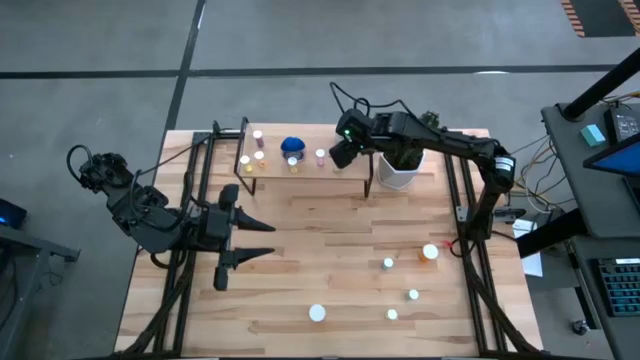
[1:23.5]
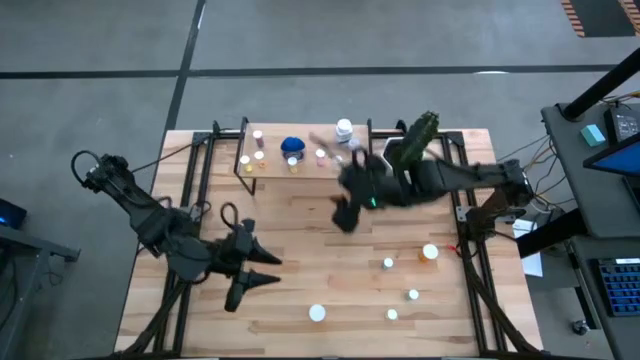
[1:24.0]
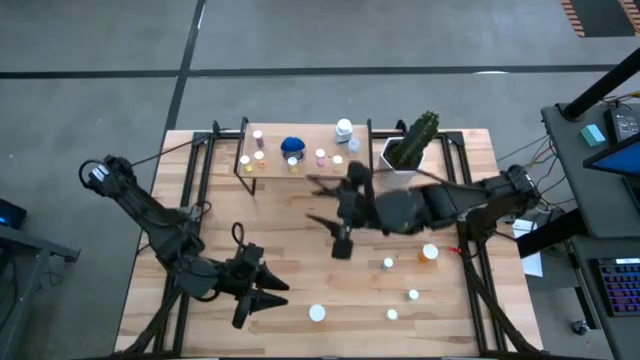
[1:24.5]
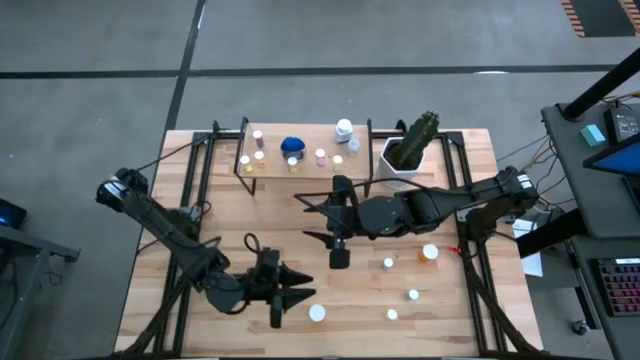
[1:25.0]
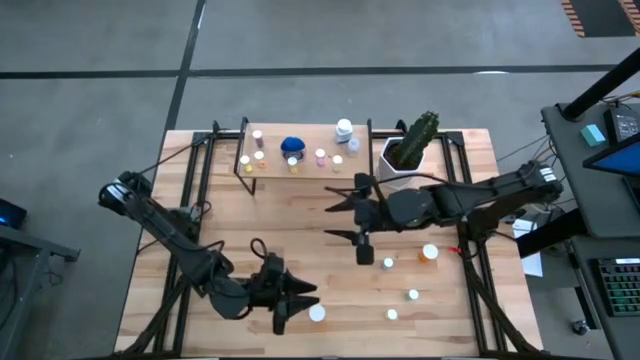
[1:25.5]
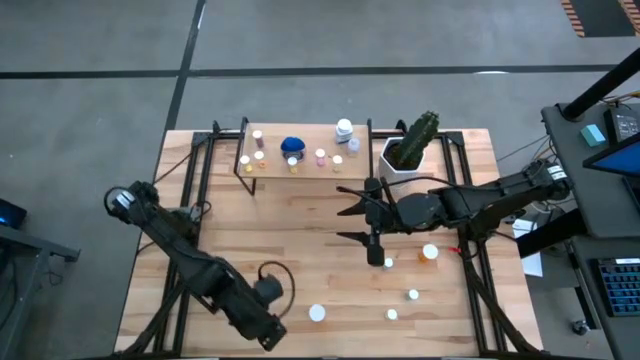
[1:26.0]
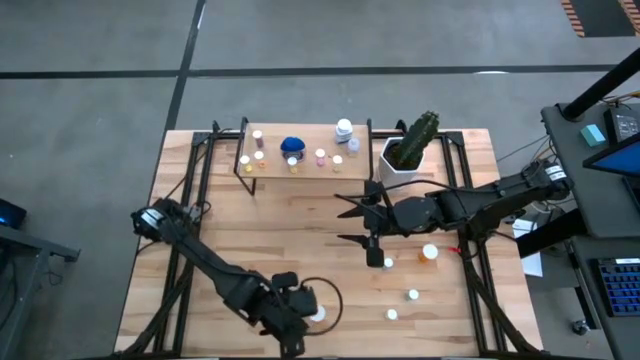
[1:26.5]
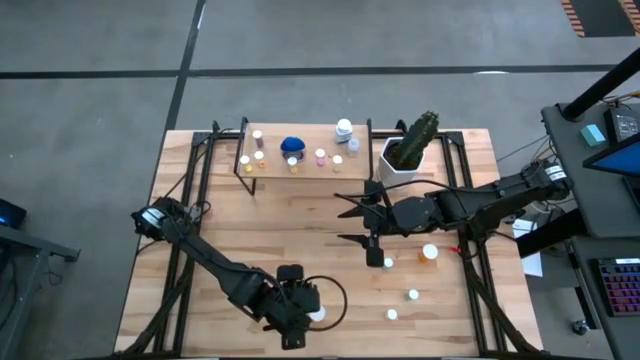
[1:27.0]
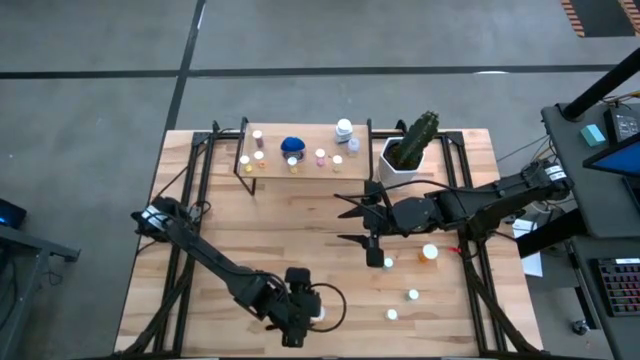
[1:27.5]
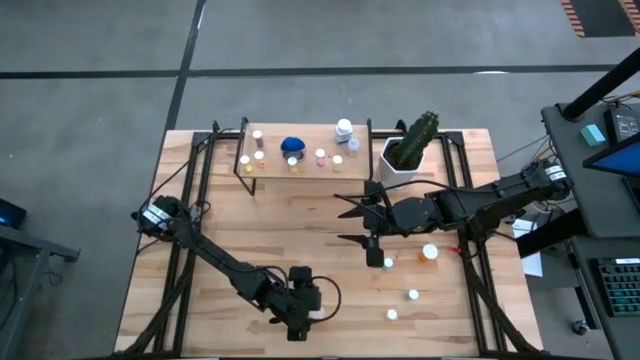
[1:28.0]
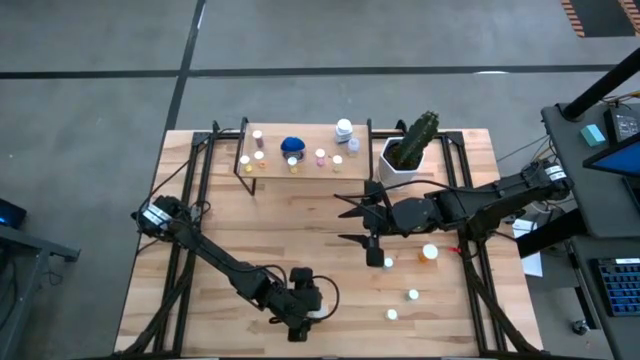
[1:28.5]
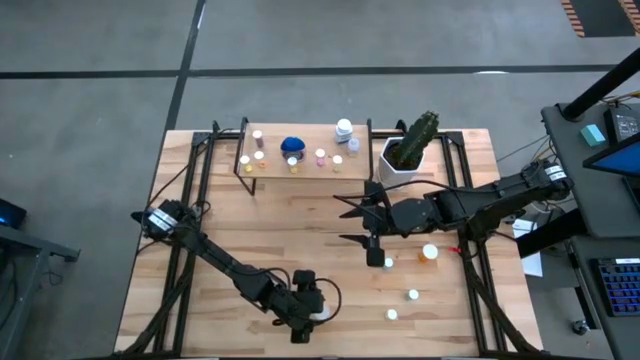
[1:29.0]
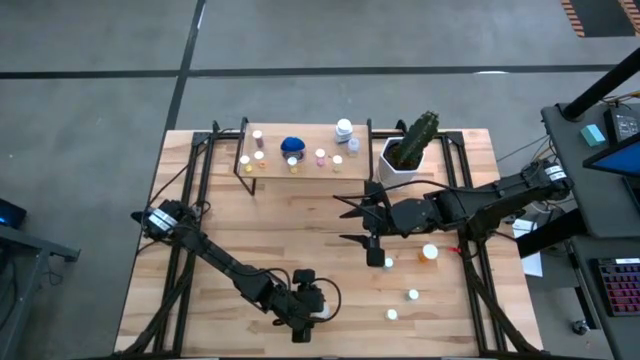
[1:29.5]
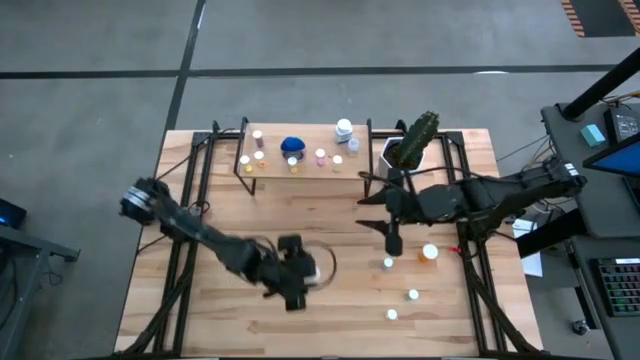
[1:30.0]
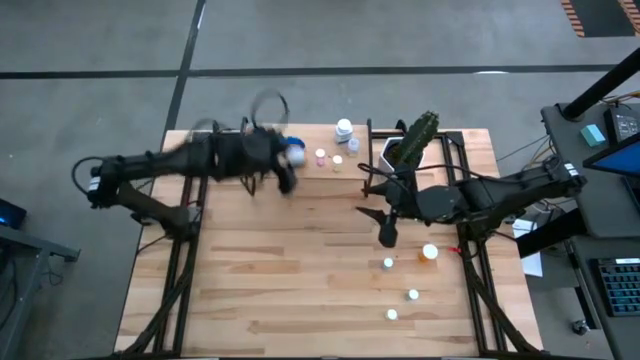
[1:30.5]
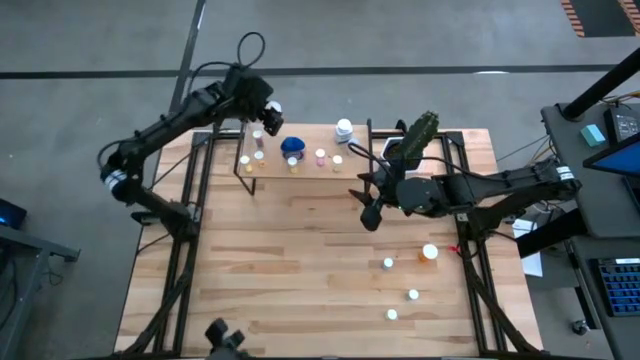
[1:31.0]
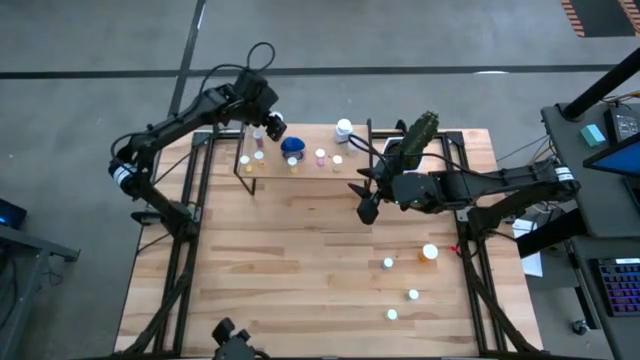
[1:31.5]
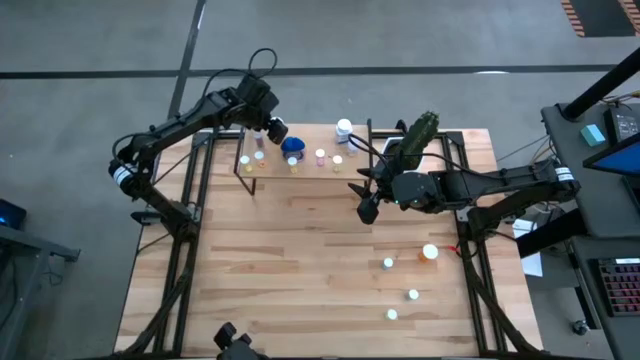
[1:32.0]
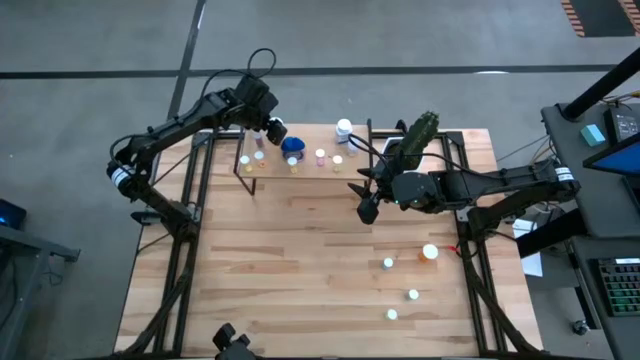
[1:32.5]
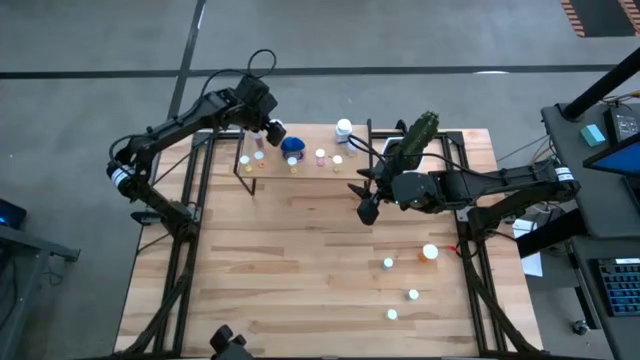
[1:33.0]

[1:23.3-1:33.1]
Task: Pick and place medicine bottles onto shelf by color
Put the orange pill bottle on the shelf

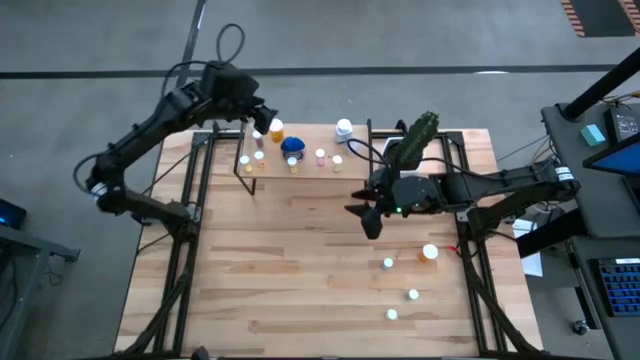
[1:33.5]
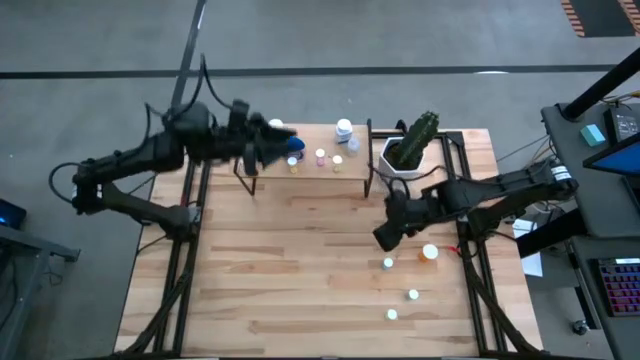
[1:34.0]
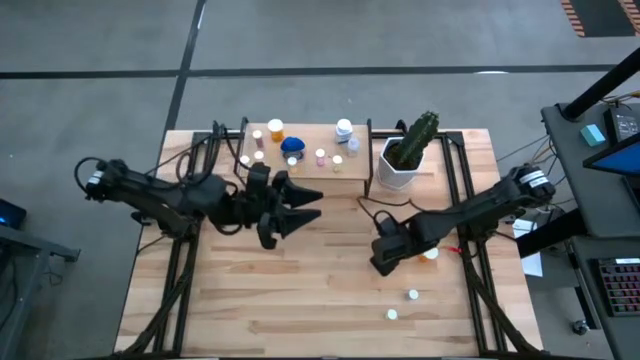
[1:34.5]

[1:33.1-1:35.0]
Put the light blue pill bottle on the shelf

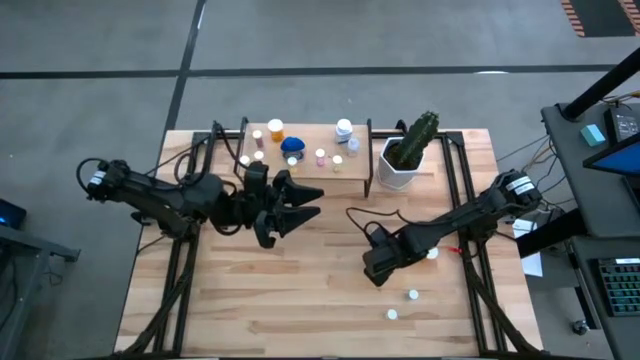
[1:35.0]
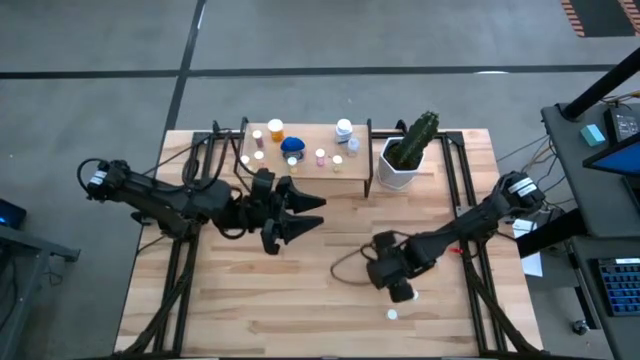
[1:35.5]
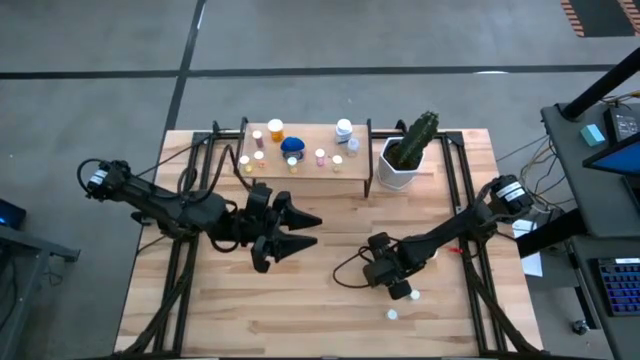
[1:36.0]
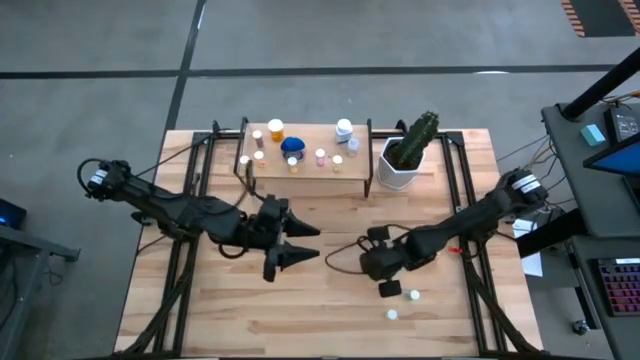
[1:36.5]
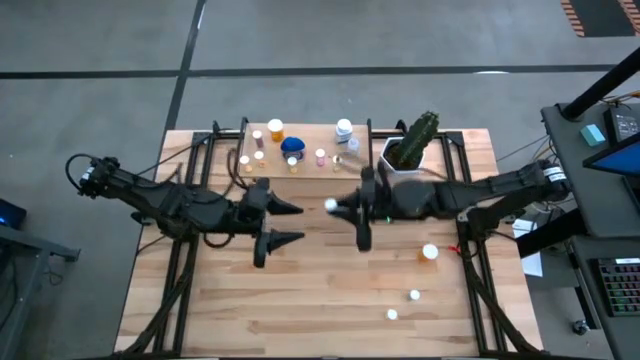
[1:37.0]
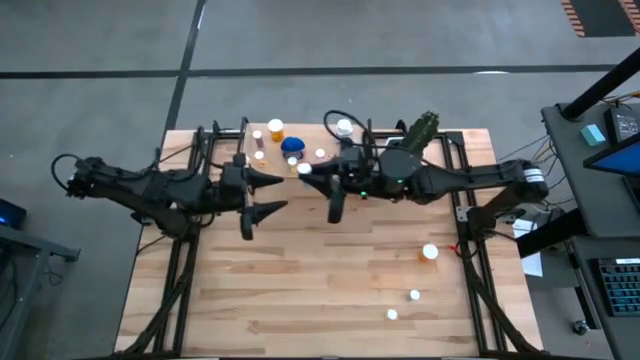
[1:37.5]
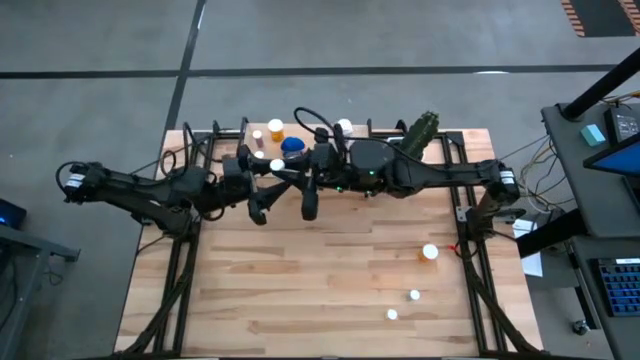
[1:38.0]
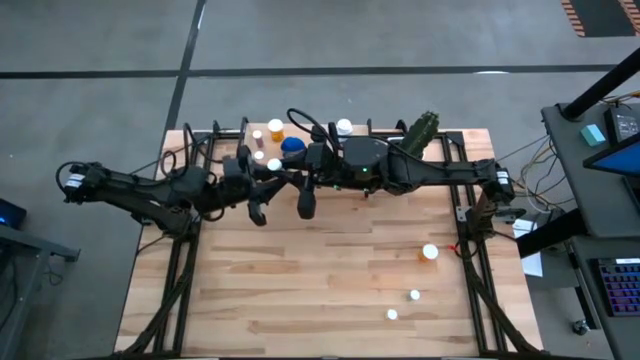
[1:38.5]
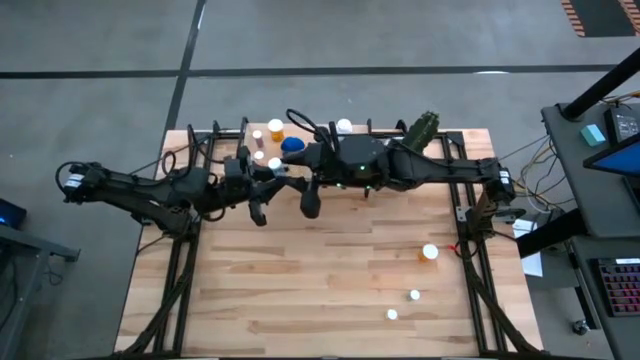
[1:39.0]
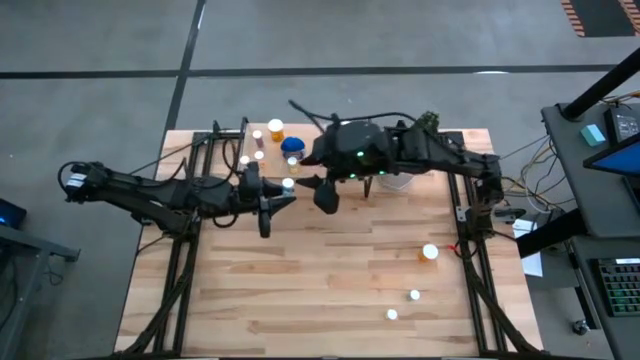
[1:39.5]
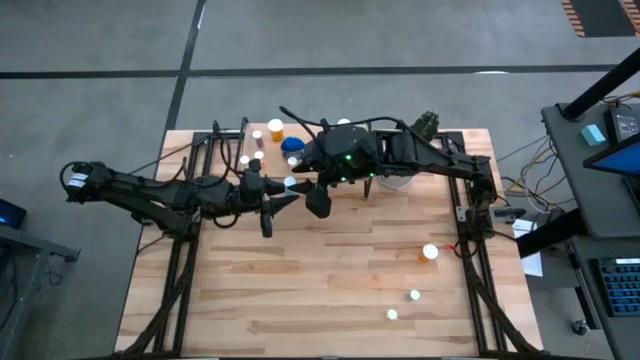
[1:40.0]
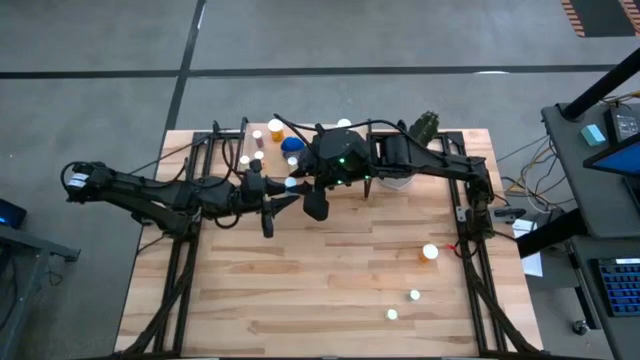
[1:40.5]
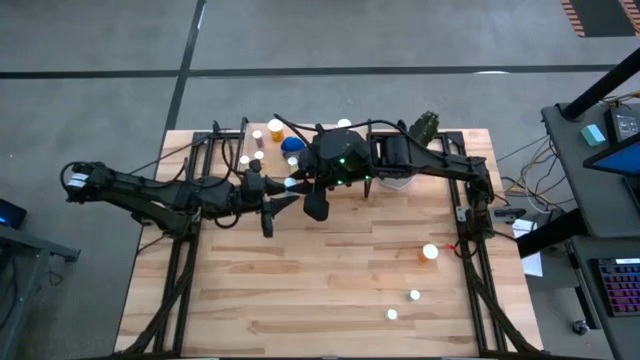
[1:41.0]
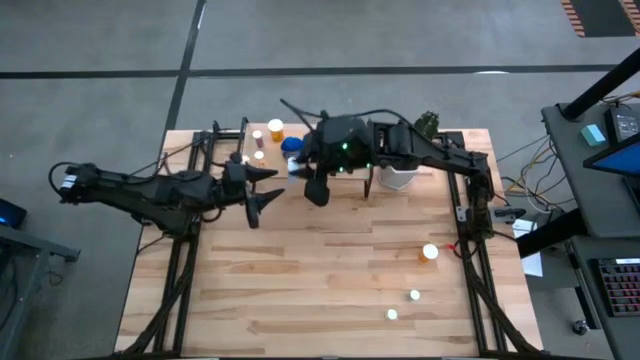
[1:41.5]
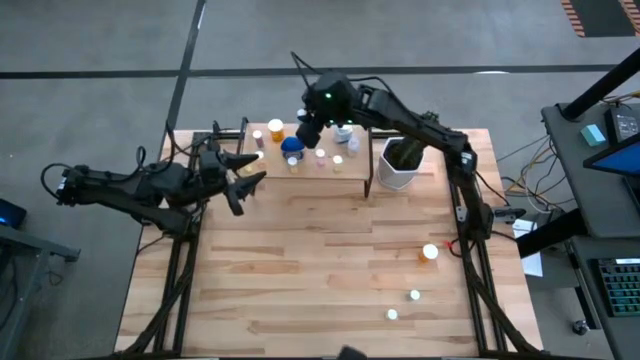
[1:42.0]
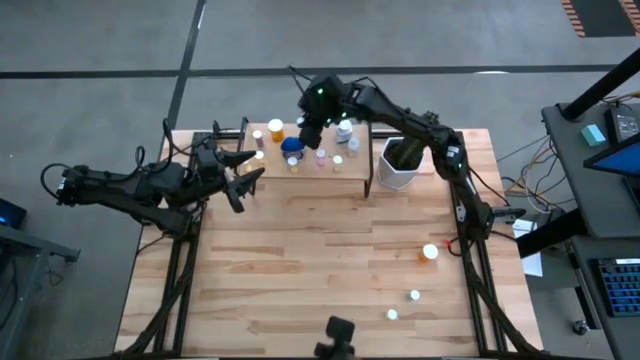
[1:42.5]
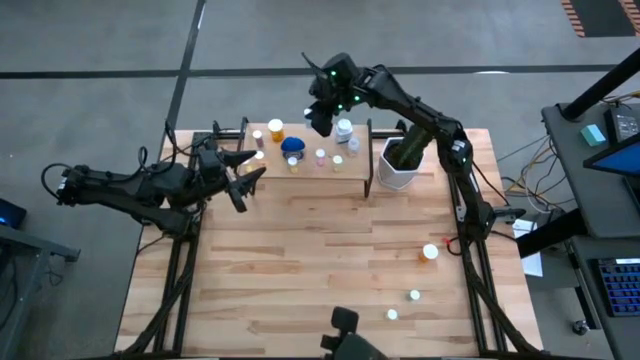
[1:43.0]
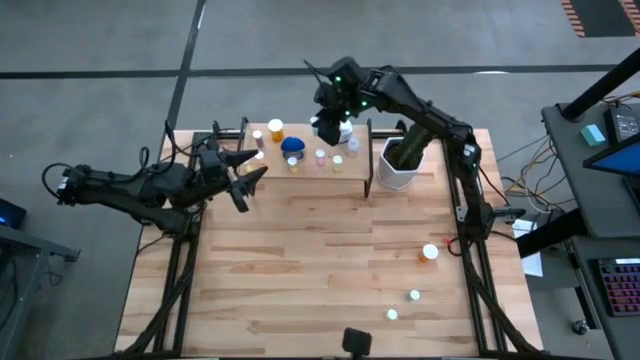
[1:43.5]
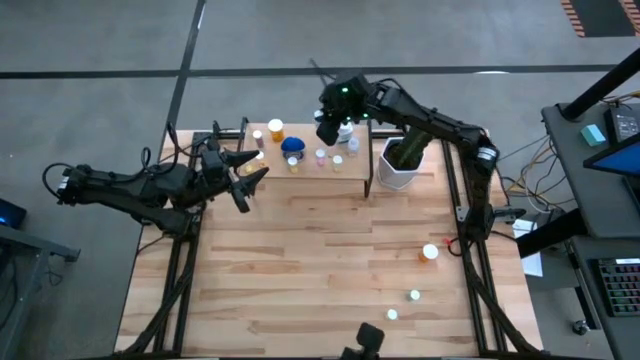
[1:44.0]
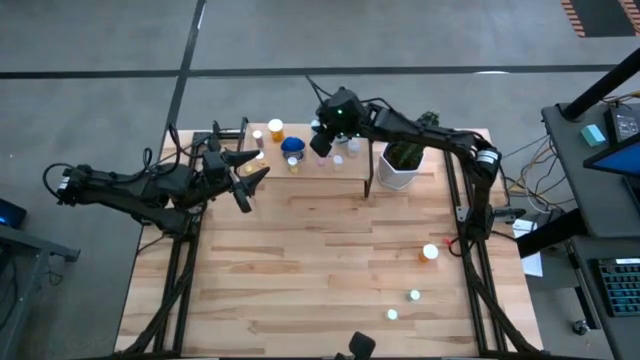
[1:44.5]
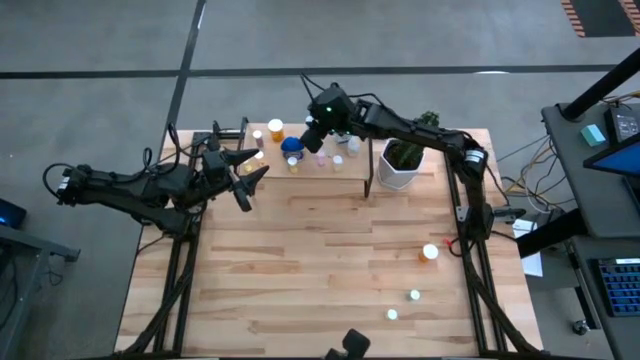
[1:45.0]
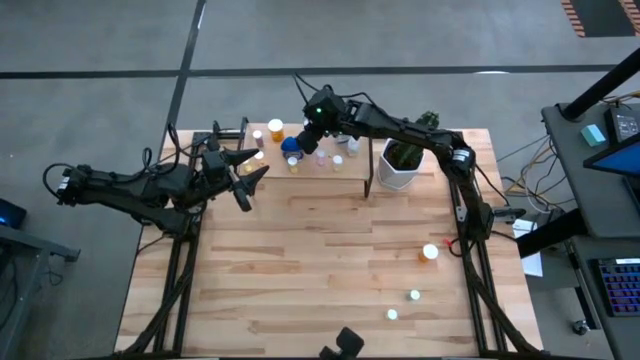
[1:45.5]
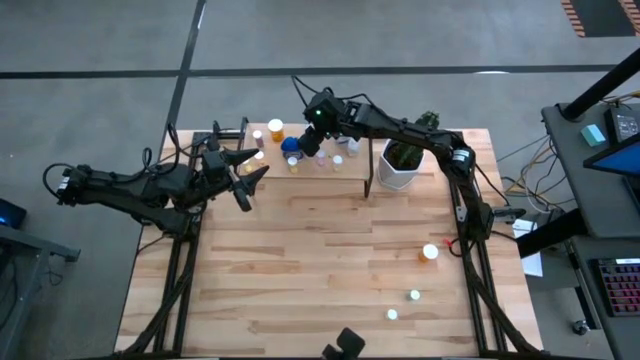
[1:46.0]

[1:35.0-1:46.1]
Put the light blue pill bottle on the shelf
